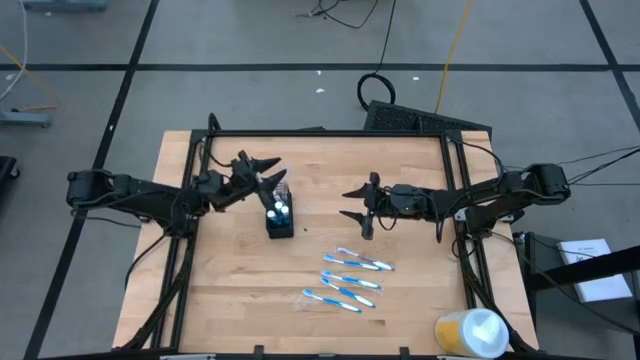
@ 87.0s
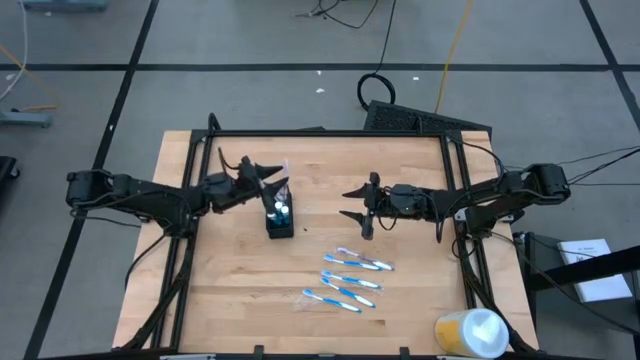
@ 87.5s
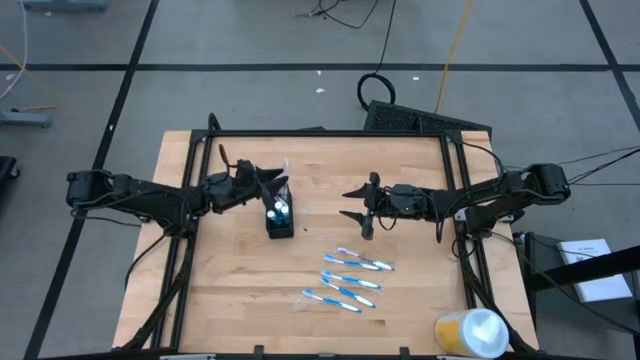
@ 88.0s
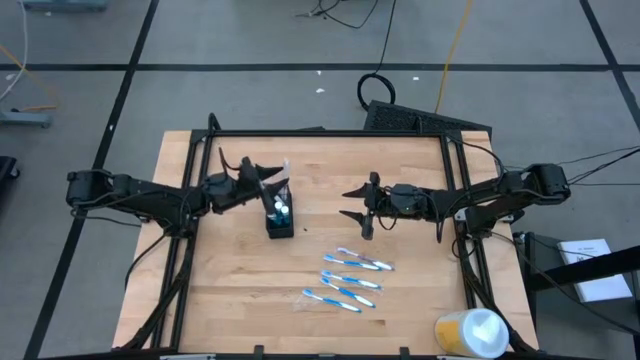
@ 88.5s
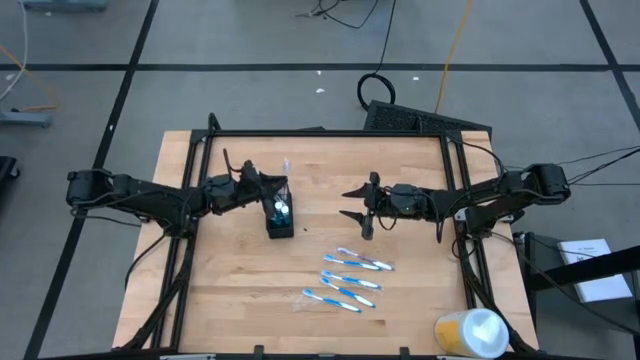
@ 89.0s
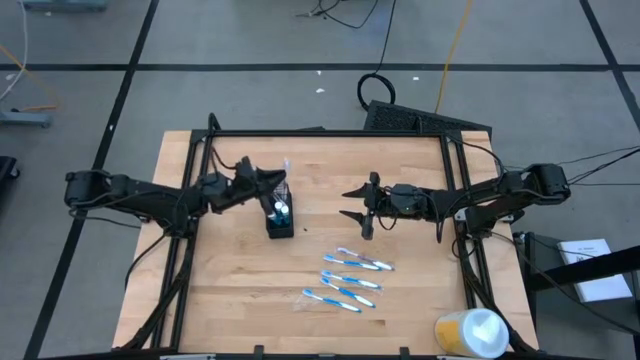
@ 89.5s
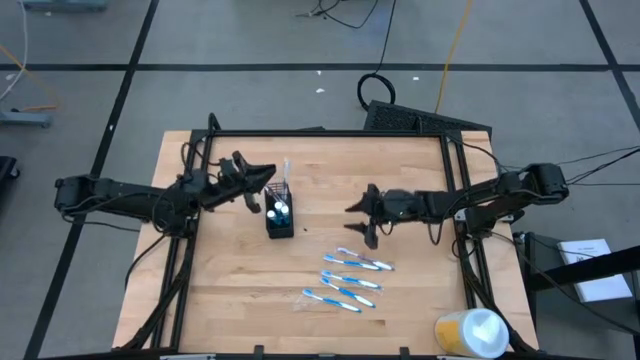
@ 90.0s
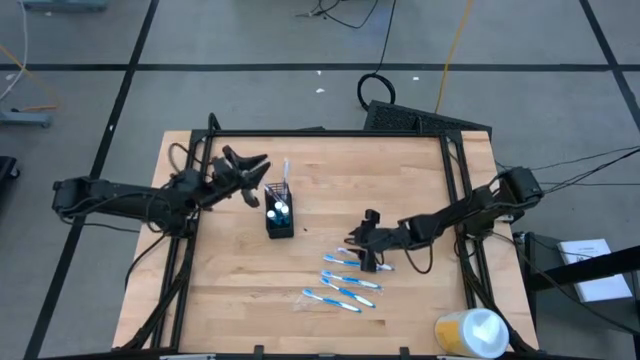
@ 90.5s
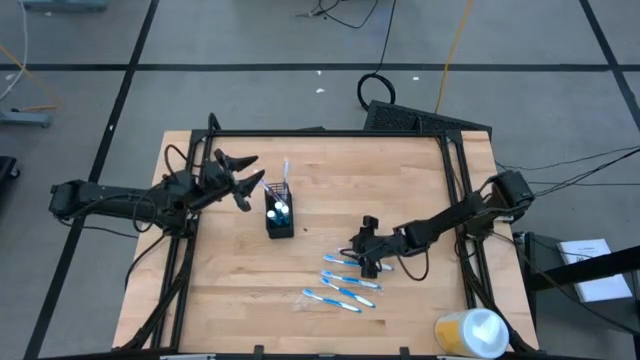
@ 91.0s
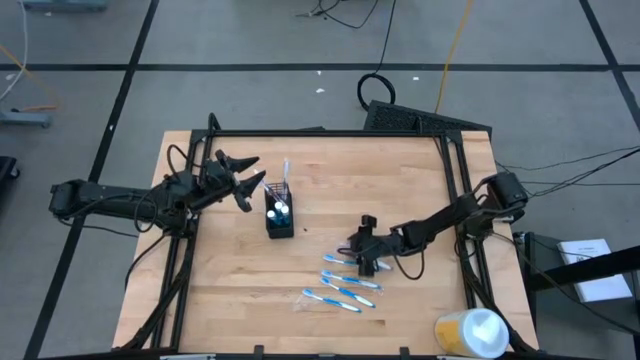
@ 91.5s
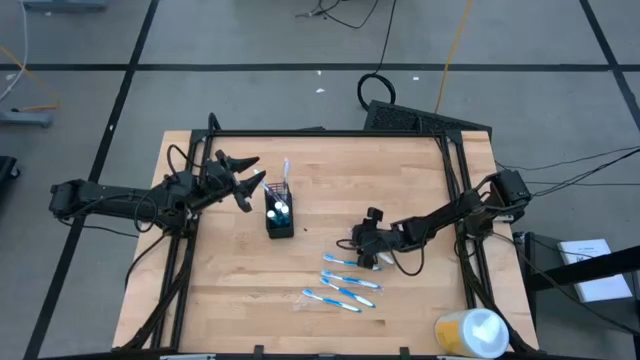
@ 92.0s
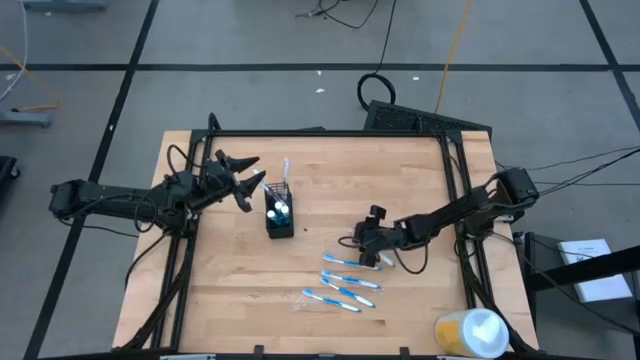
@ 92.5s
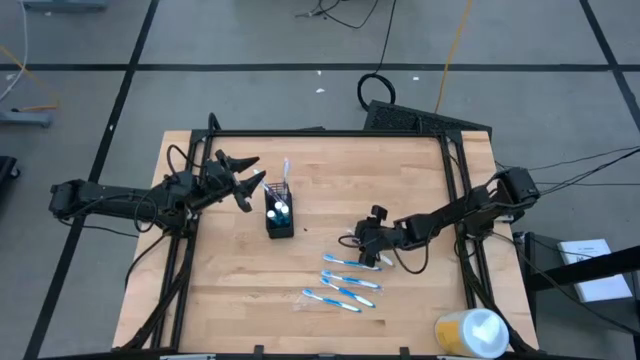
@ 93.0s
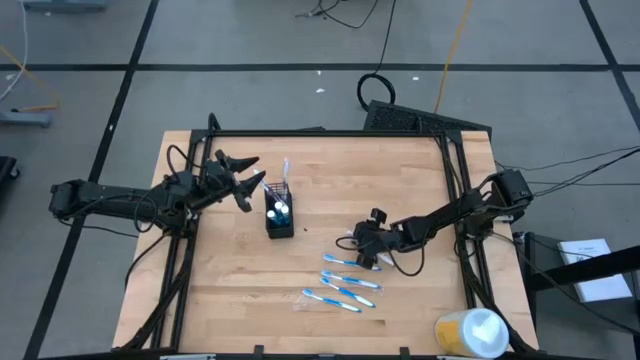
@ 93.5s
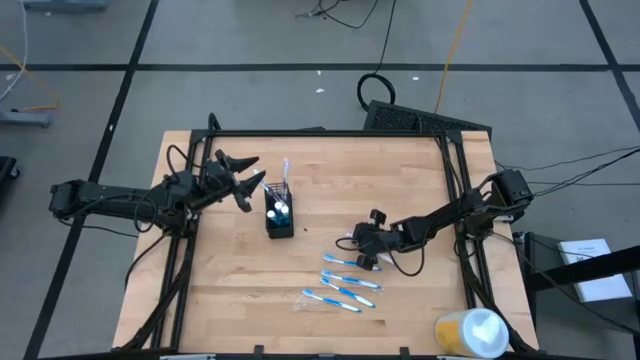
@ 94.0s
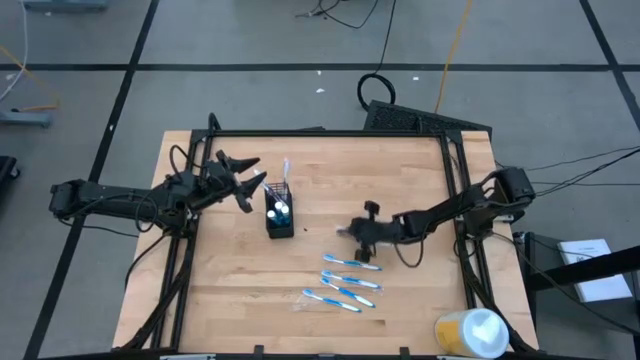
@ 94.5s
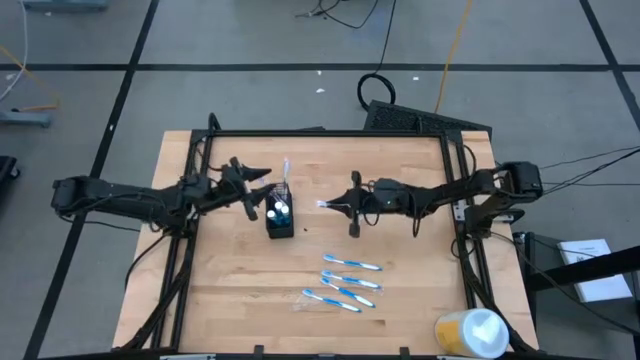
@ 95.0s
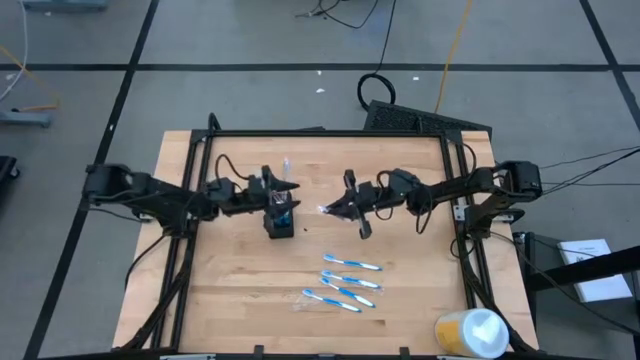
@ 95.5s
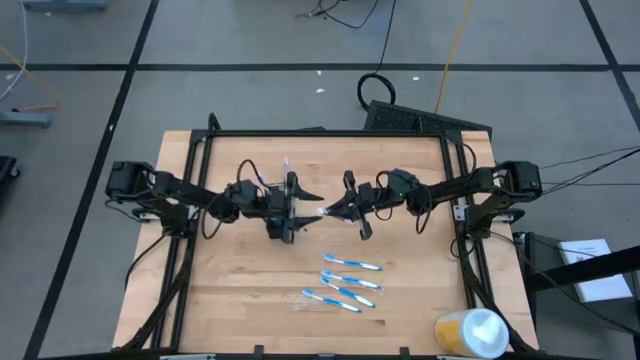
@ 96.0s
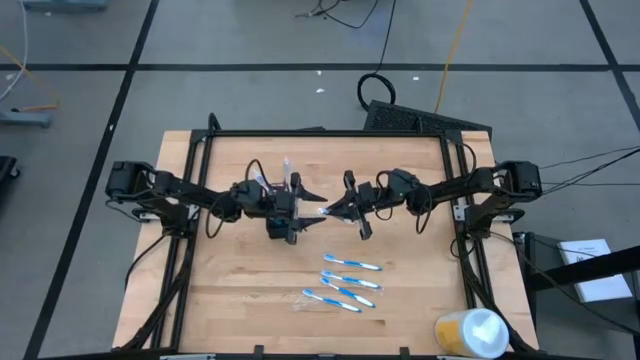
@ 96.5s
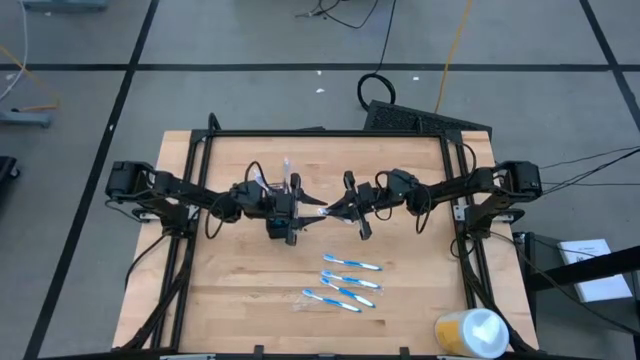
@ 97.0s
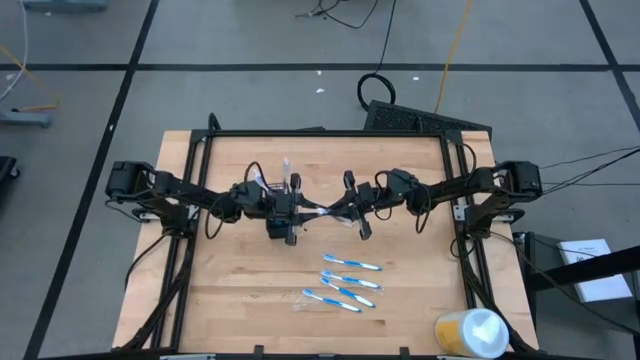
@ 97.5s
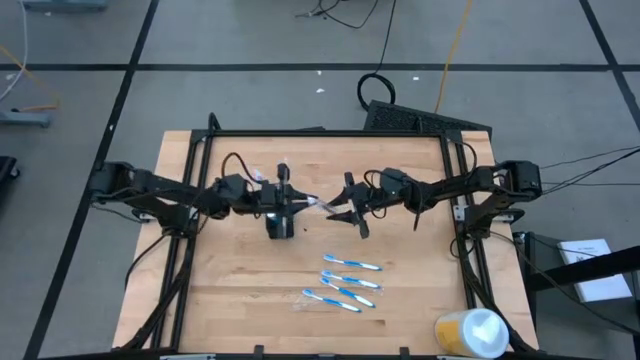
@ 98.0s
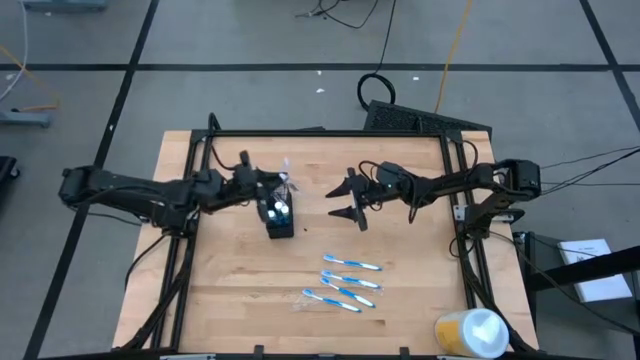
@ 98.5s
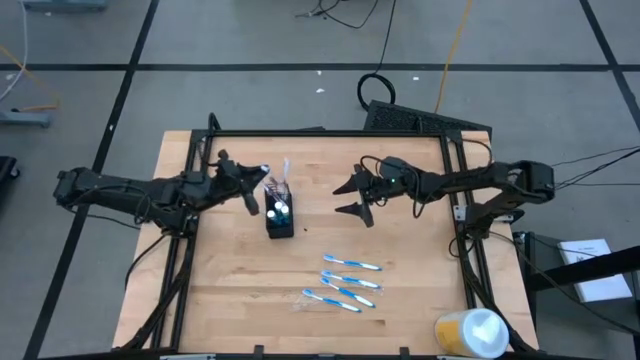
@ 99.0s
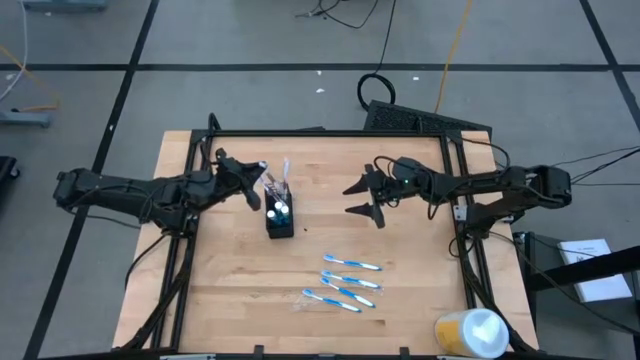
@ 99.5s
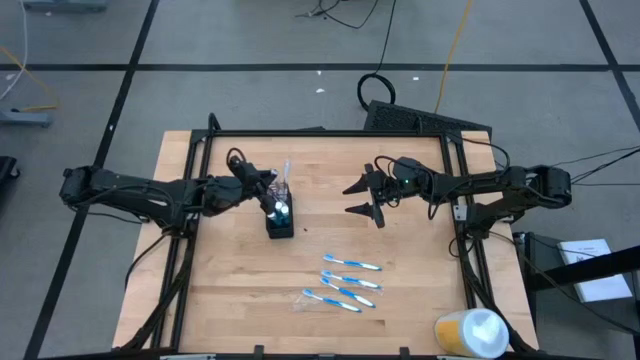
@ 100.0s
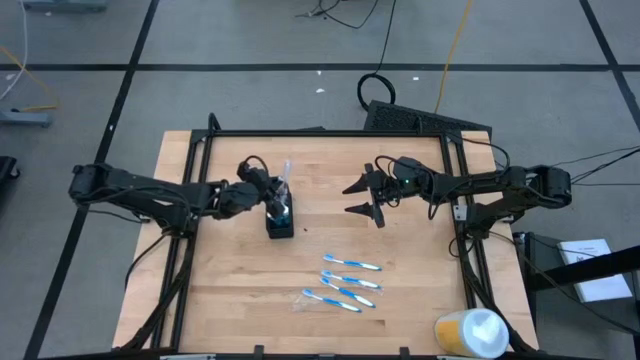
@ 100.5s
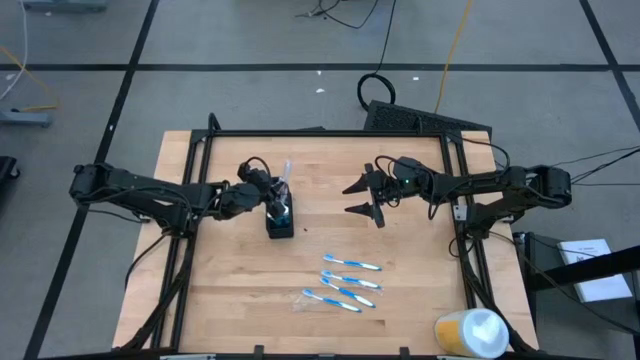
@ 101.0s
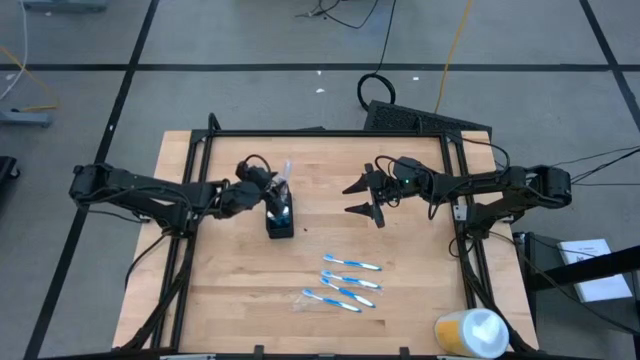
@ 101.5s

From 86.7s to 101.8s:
Task: Pick & Place toothbrushing station
Put the purple toothbrush into the black organizer

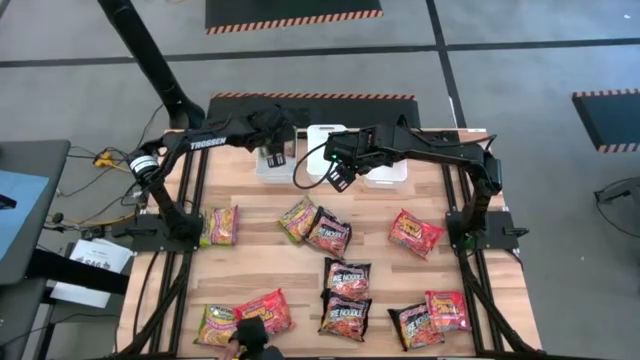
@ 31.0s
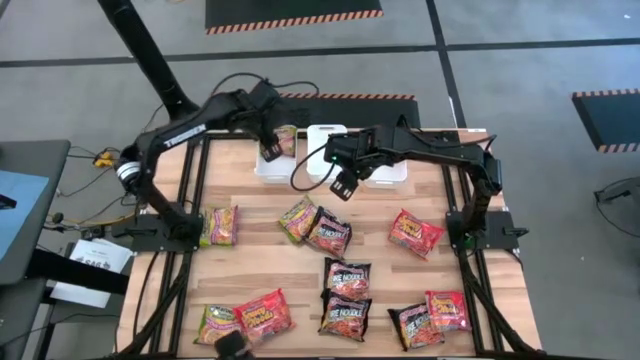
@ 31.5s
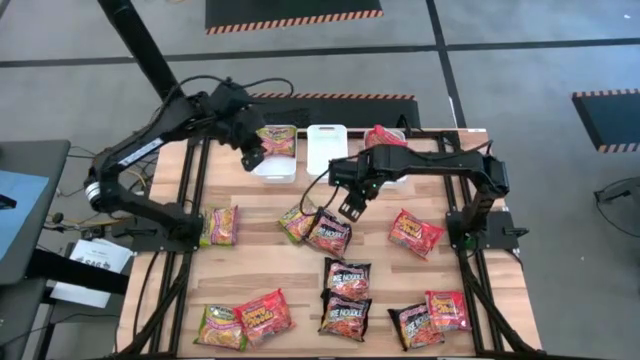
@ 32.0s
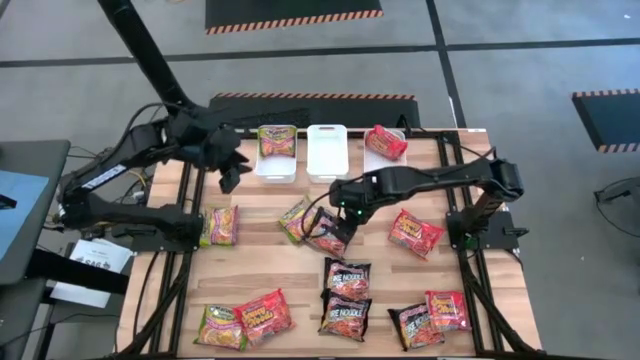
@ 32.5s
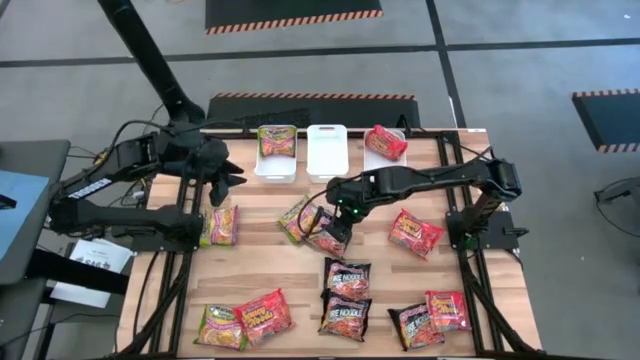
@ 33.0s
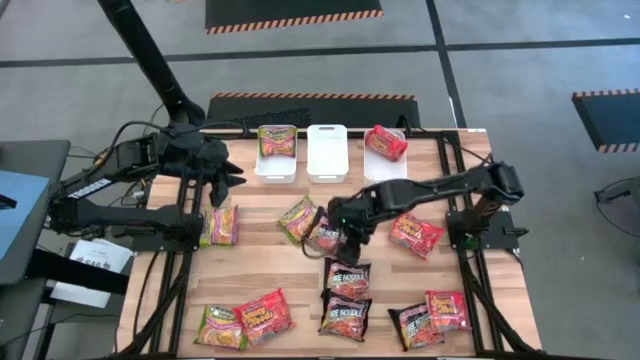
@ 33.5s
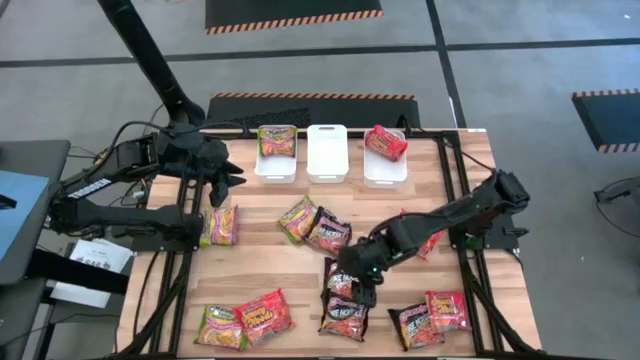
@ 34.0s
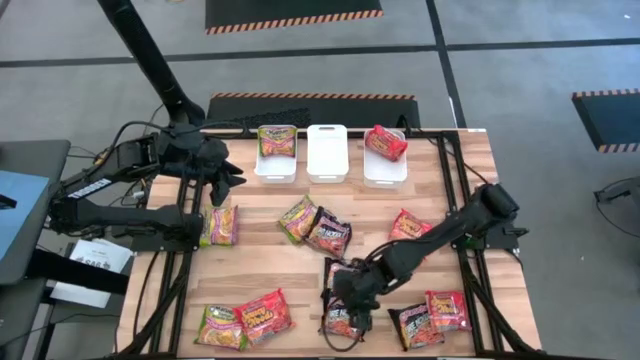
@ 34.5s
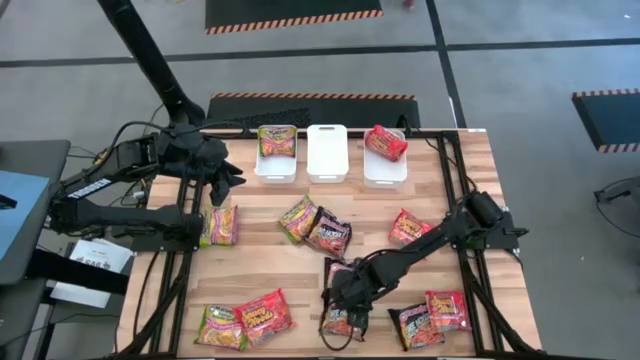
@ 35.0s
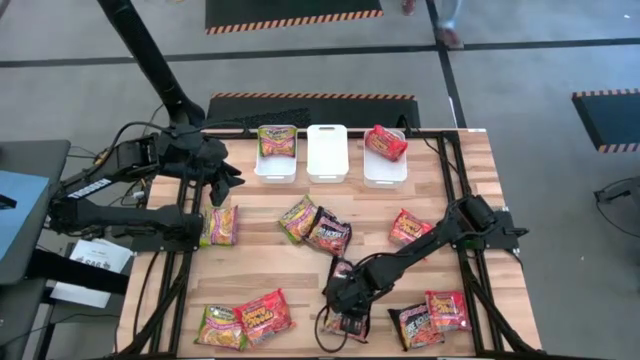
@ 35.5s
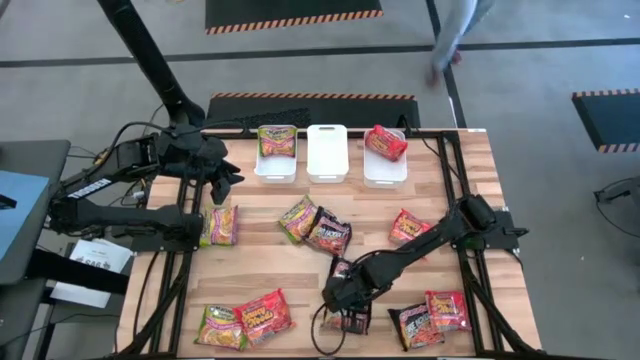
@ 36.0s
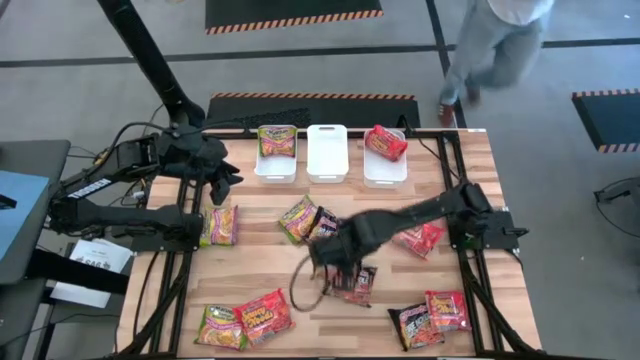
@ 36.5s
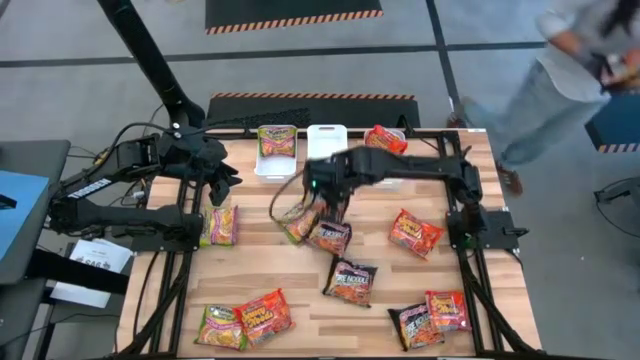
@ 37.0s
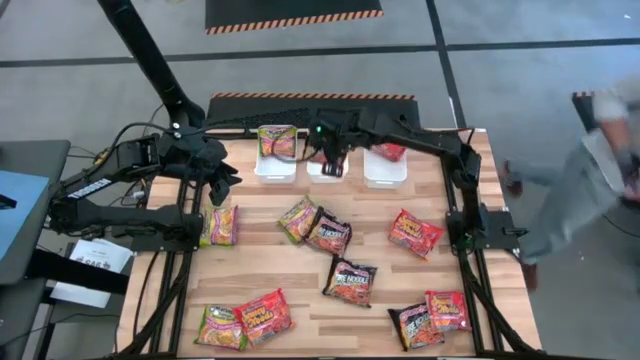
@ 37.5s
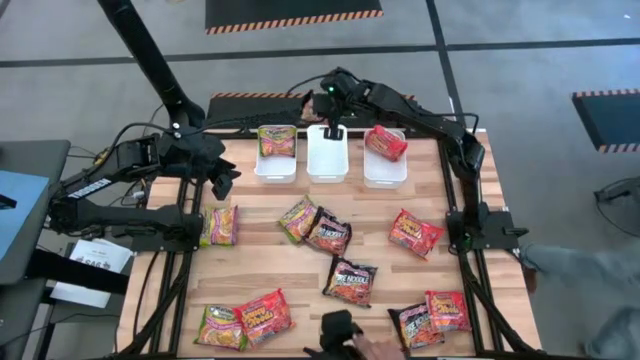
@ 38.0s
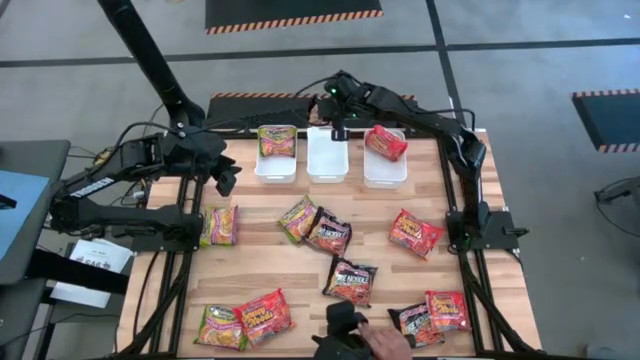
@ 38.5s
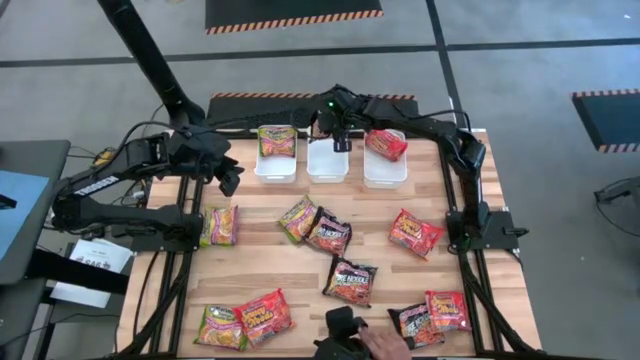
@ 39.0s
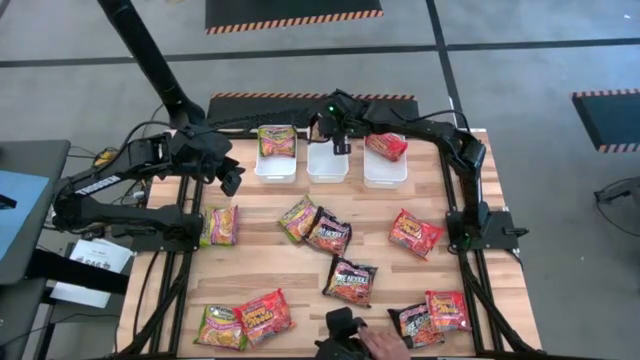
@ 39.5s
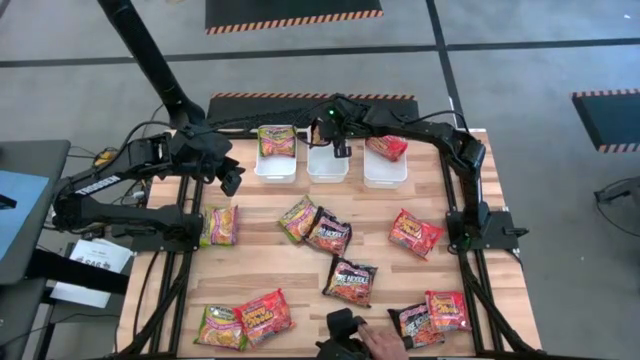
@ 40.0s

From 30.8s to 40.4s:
Task: Sort Maruchan noodles
Put the black noodle pack into the middle white bin
